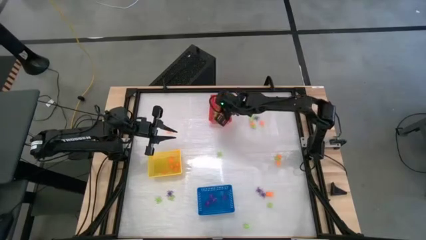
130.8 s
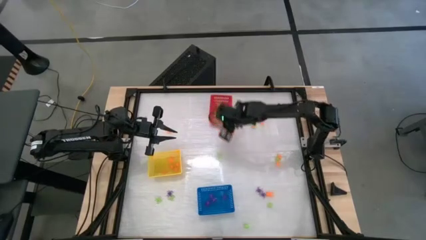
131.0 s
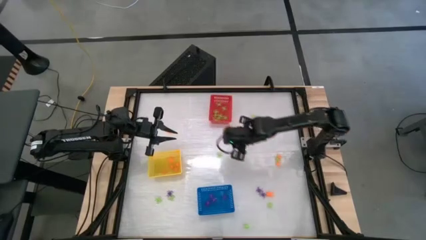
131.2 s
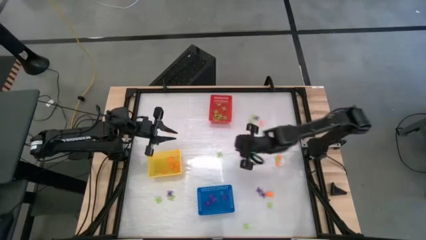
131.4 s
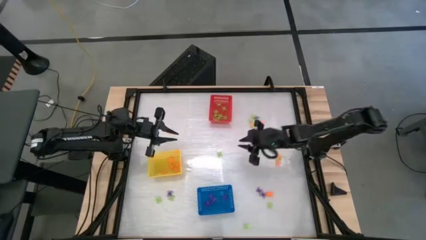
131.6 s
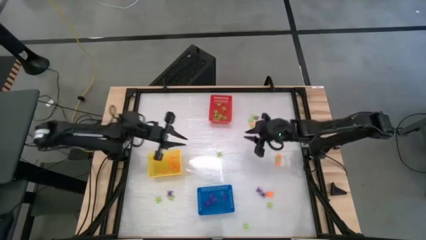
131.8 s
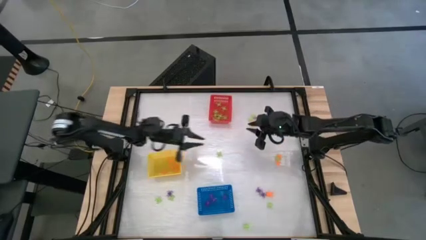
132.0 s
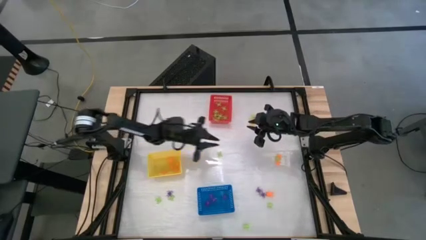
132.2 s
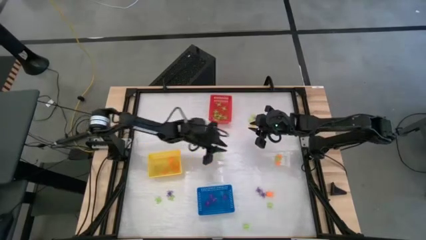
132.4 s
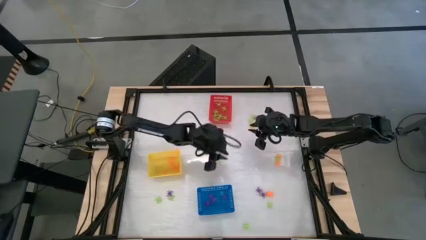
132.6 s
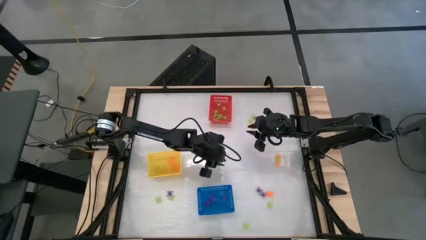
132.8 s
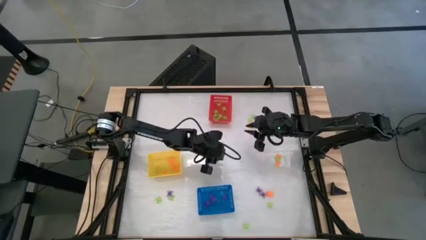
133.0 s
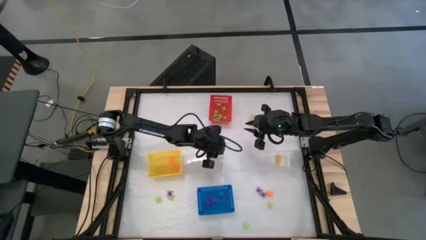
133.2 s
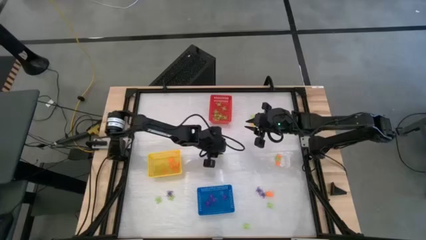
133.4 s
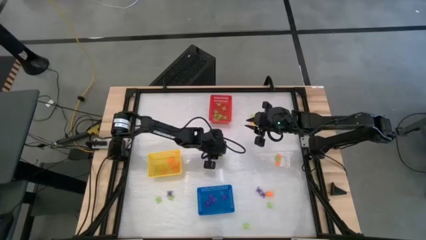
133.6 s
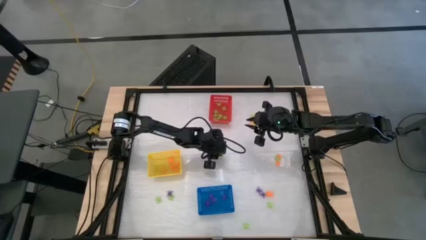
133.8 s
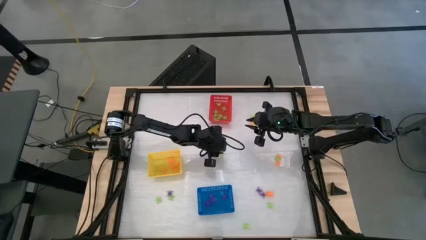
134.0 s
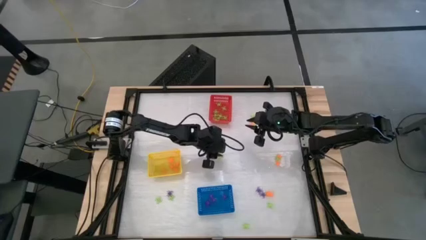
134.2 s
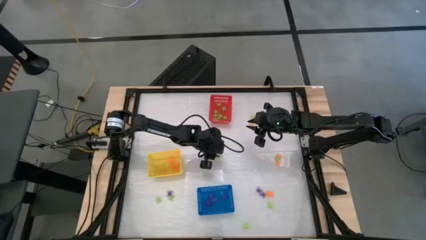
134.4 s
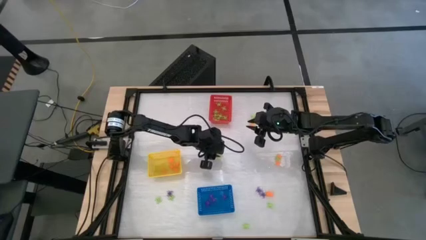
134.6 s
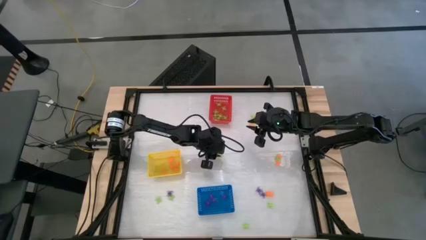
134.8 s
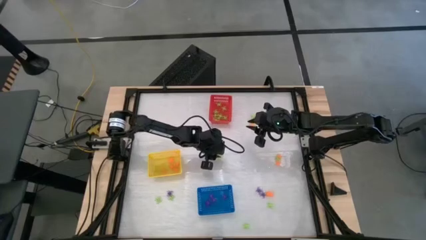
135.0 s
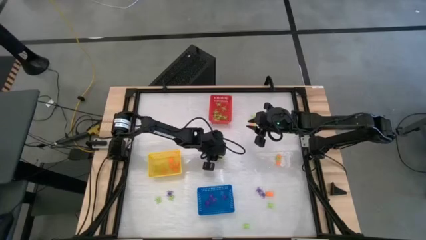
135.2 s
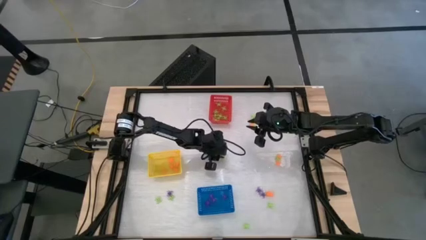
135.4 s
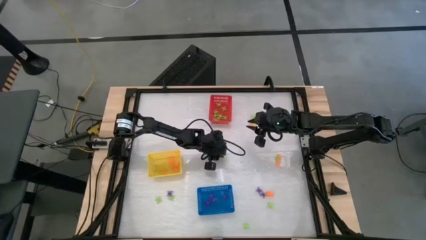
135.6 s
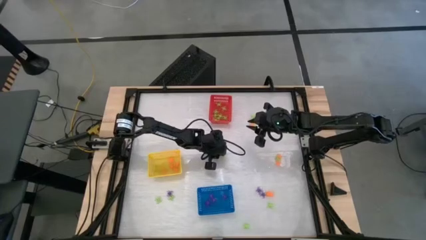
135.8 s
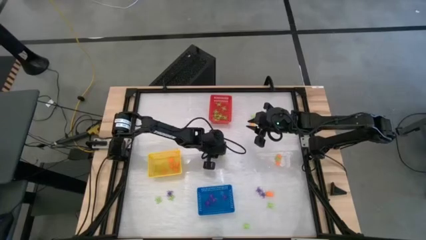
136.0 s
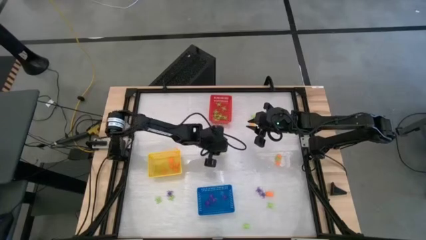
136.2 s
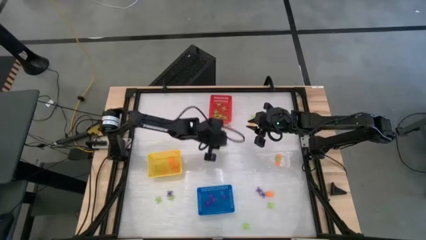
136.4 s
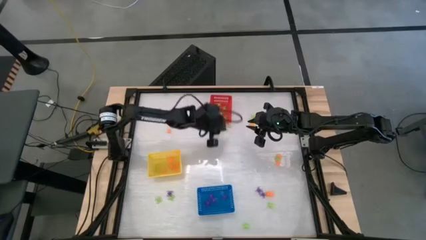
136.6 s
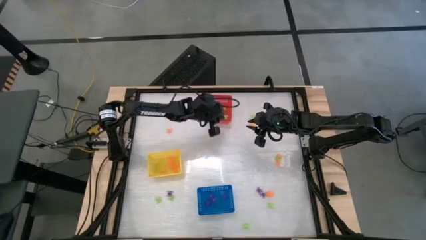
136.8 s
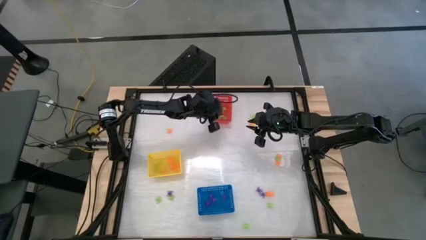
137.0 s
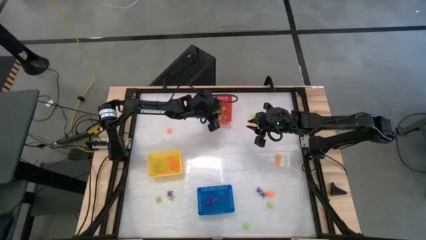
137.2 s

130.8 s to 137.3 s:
Task: Sort Halloween decoration
Put the green spider toy into the red basket

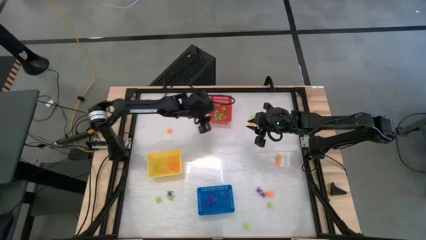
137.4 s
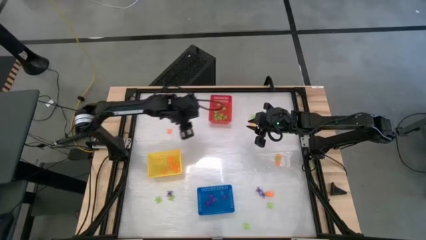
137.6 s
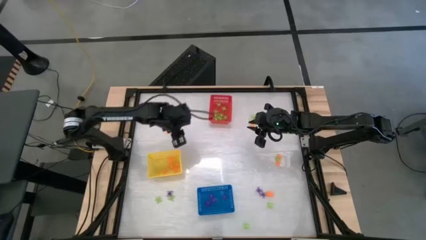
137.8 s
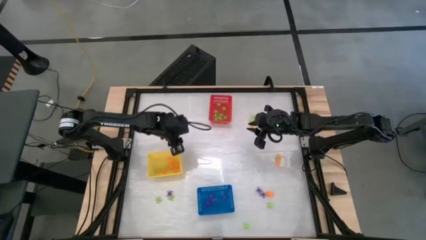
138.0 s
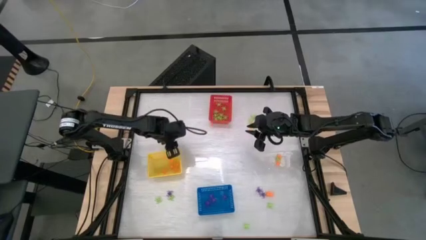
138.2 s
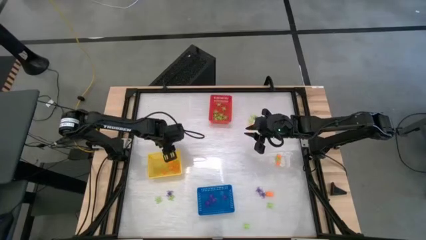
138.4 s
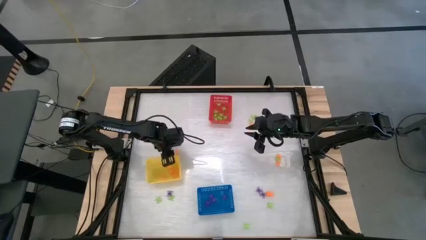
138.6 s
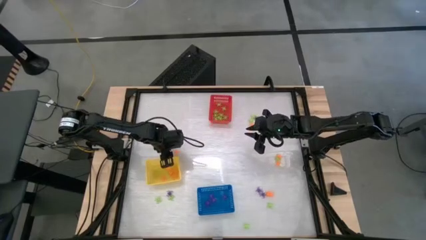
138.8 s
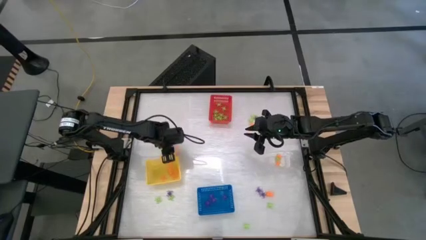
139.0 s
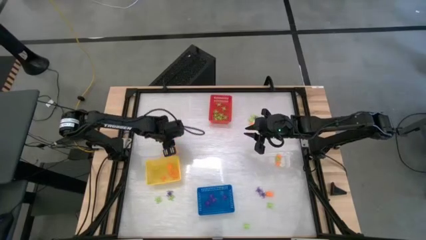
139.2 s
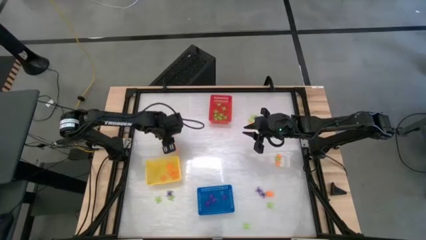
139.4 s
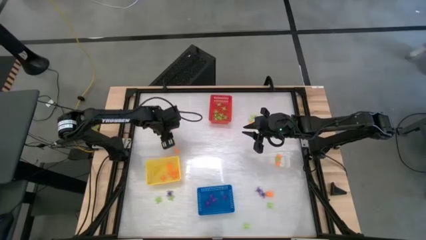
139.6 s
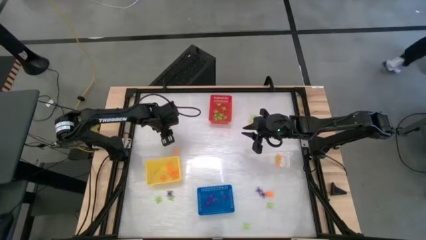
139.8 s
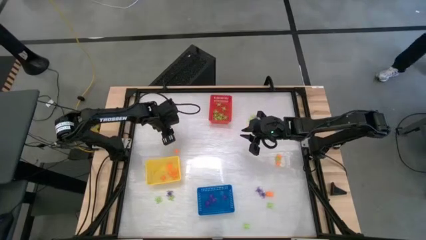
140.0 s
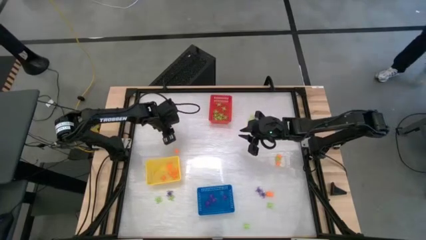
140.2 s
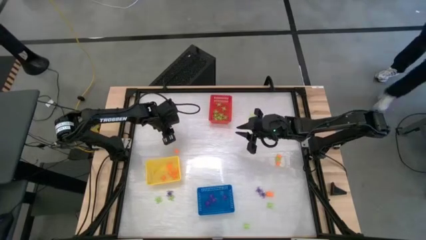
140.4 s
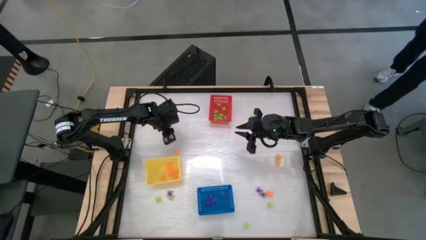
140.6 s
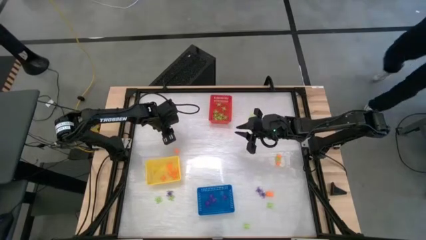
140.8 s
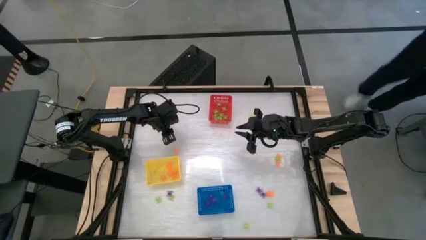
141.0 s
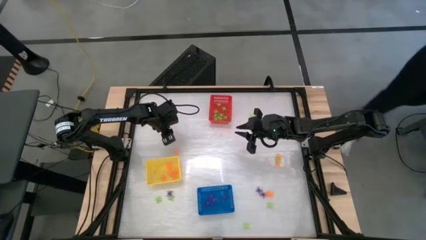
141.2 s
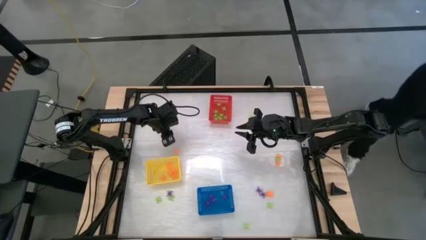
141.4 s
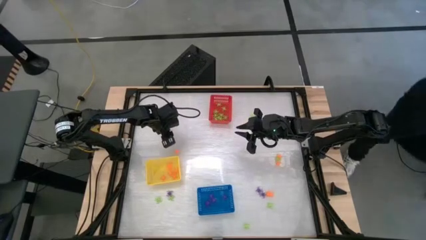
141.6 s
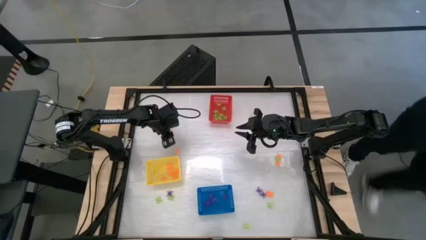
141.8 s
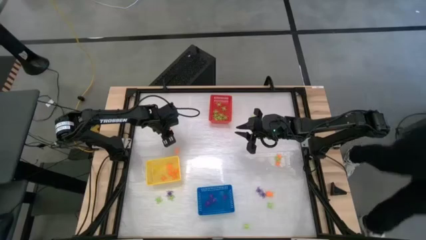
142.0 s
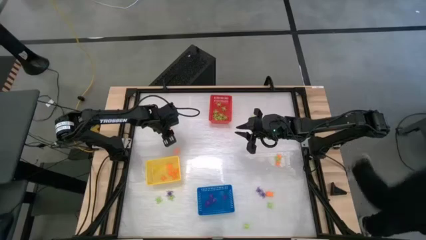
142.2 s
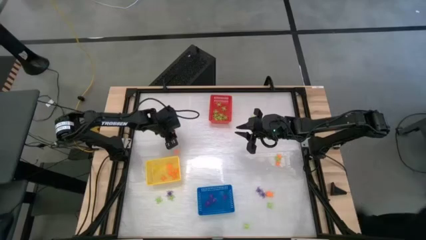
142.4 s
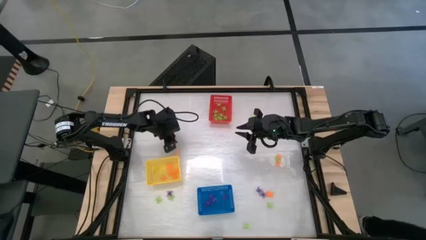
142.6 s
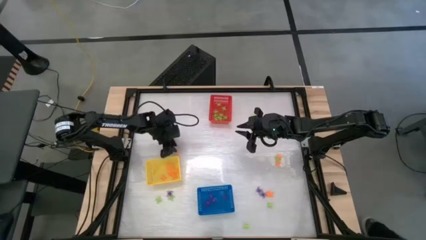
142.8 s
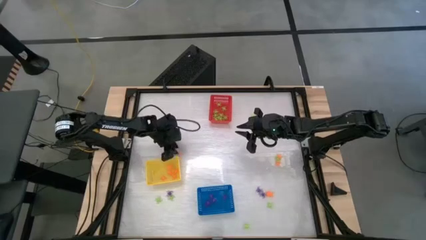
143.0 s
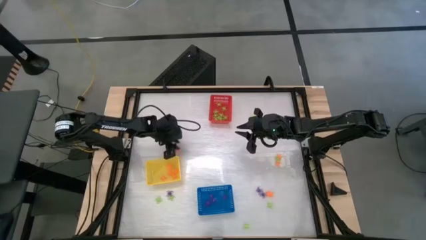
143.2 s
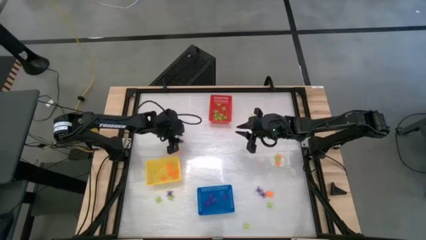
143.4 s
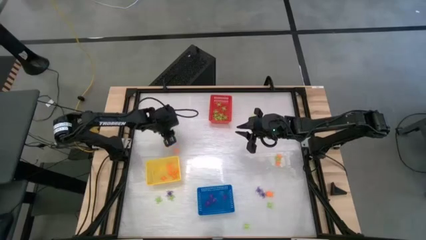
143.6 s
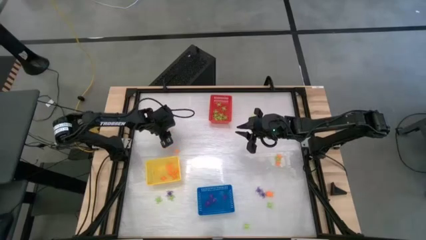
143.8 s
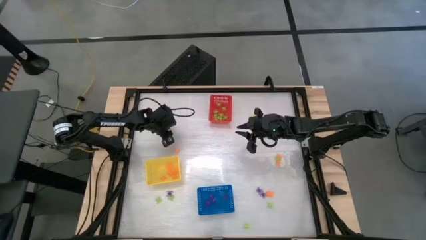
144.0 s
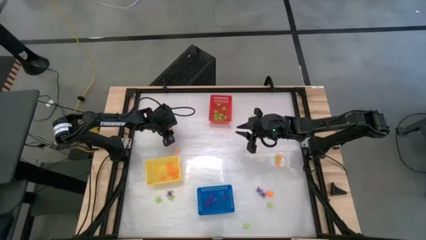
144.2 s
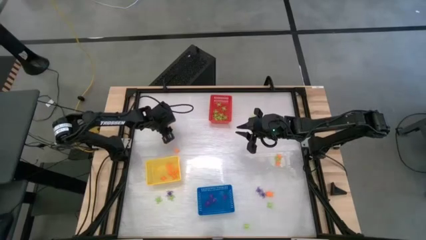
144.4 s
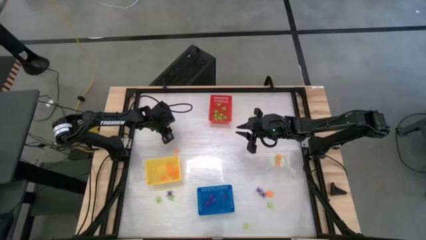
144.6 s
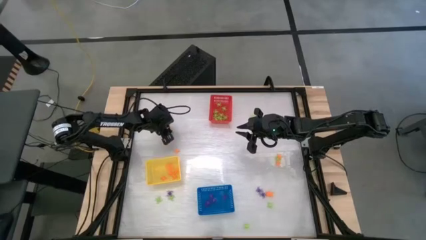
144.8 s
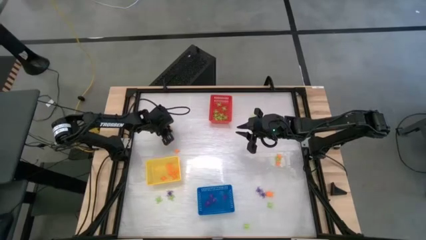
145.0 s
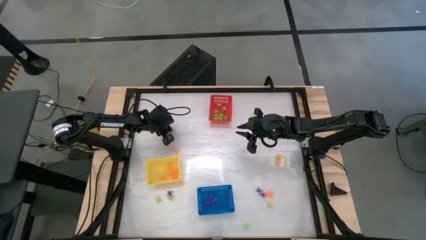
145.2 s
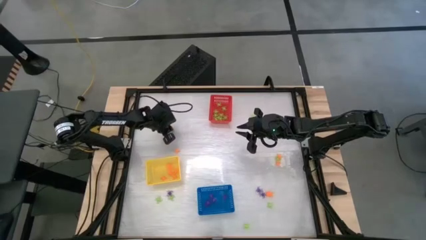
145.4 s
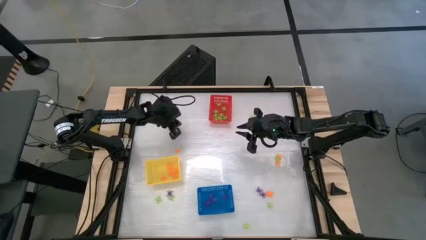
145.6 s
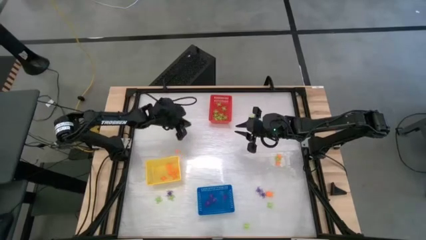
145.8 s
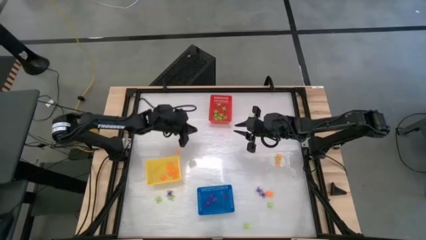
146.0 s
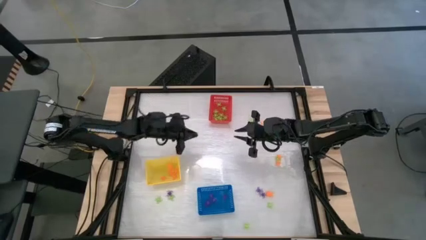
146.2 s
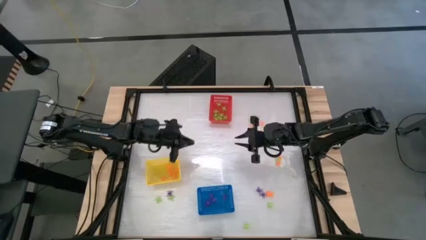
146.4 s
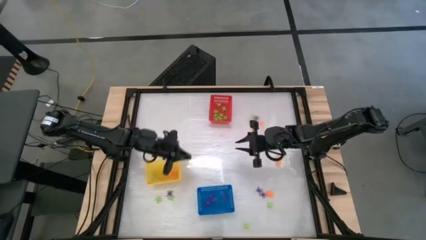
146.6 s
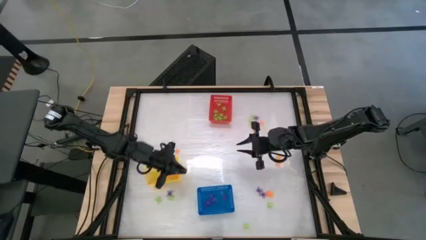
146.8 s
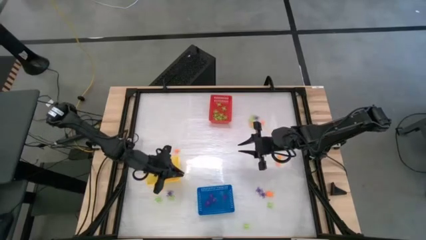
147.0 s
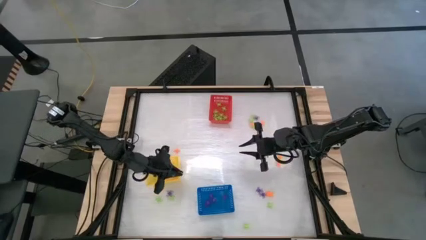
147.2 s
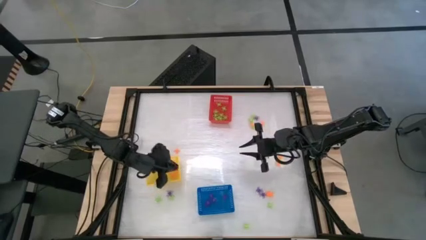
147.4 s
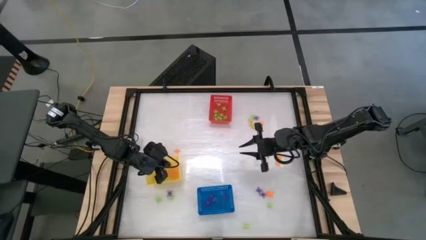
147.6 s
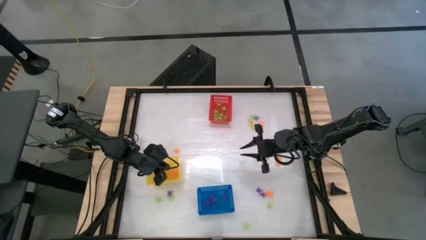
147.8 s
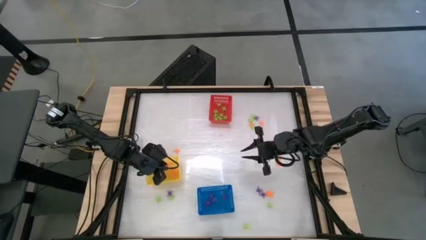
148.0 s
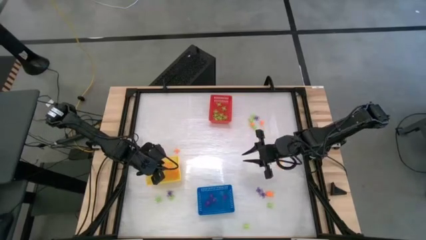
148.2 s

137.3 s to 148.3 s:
Put the orange spider toy into the yellow basket
